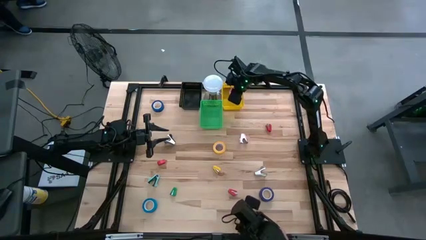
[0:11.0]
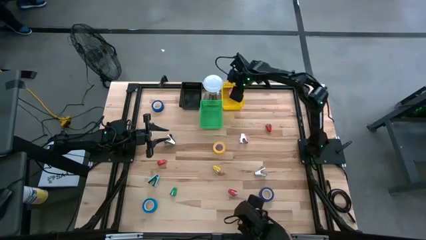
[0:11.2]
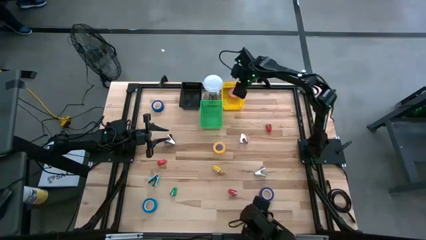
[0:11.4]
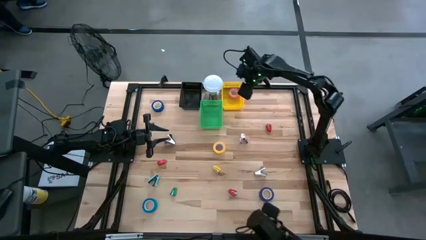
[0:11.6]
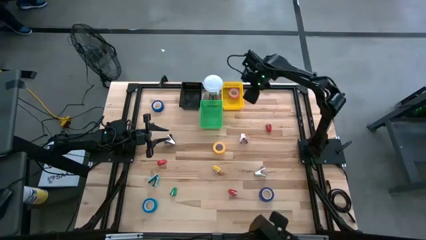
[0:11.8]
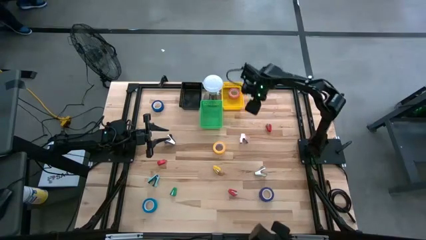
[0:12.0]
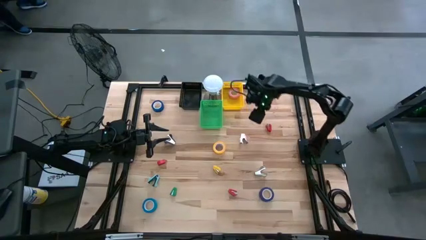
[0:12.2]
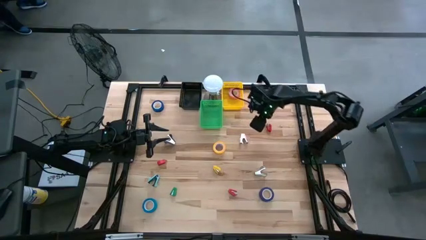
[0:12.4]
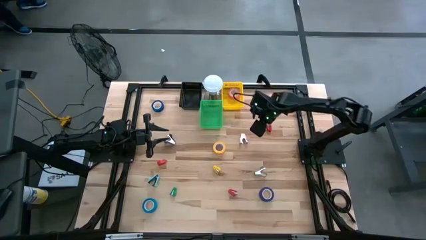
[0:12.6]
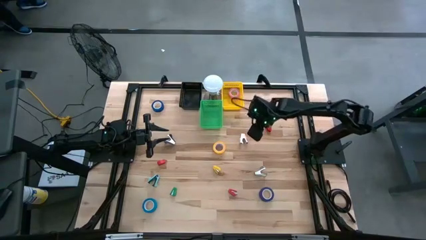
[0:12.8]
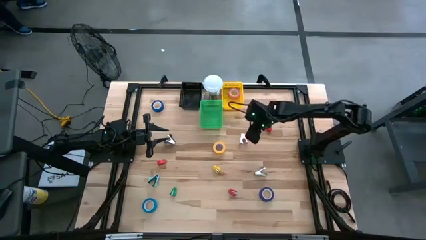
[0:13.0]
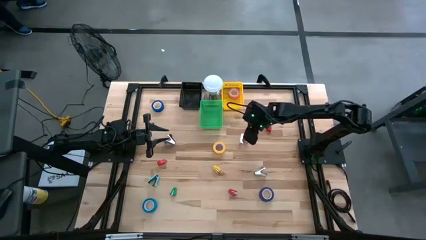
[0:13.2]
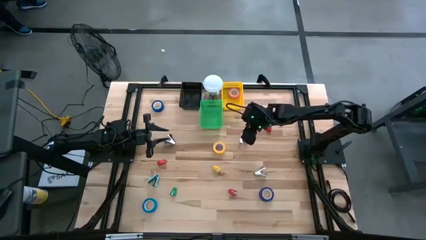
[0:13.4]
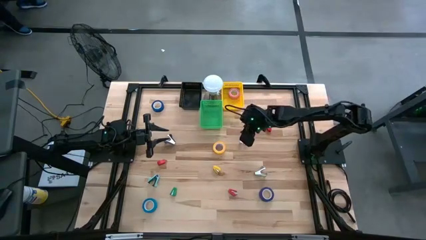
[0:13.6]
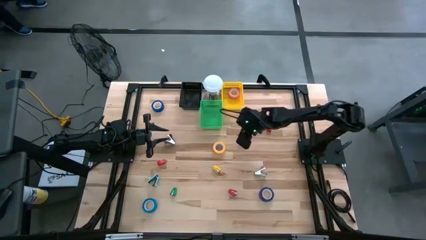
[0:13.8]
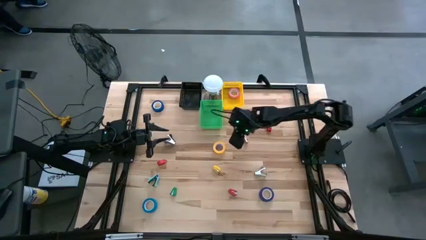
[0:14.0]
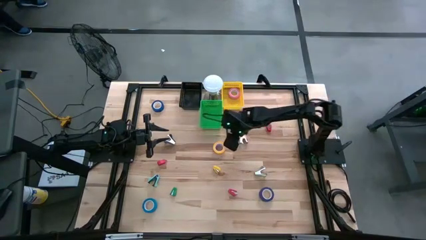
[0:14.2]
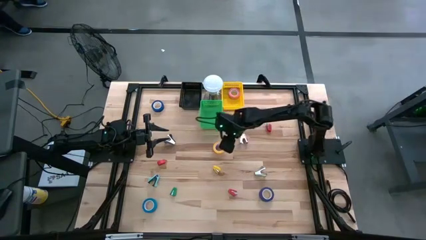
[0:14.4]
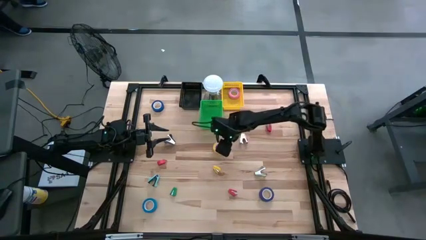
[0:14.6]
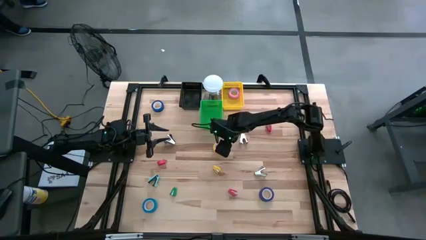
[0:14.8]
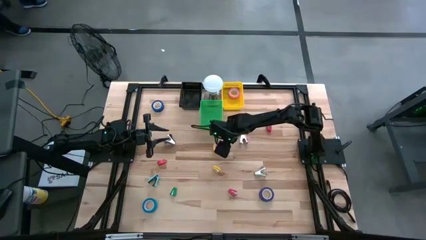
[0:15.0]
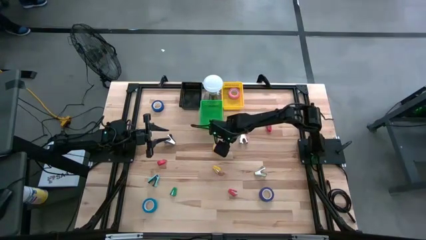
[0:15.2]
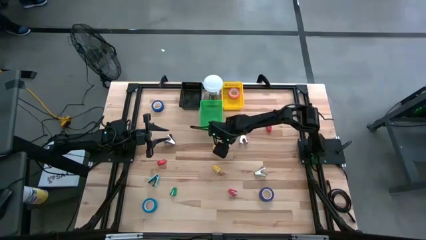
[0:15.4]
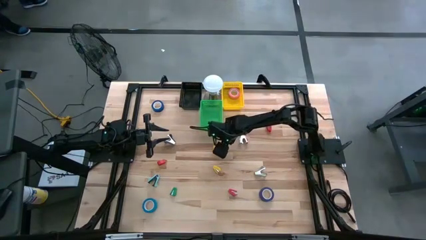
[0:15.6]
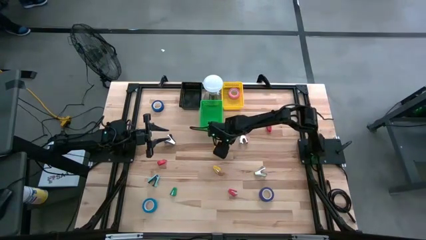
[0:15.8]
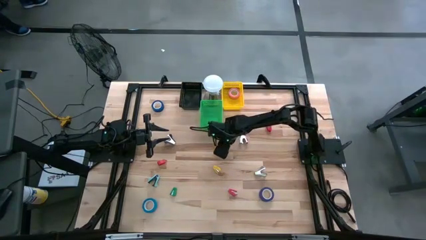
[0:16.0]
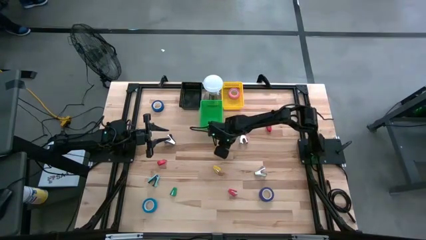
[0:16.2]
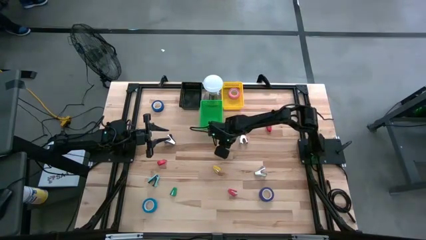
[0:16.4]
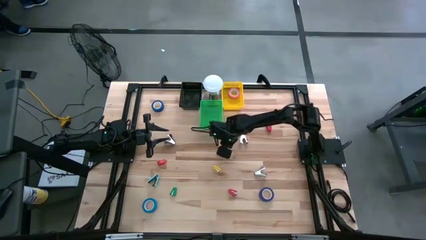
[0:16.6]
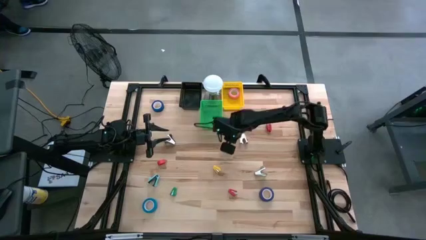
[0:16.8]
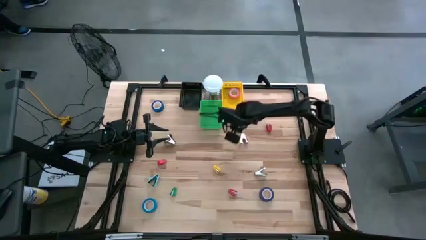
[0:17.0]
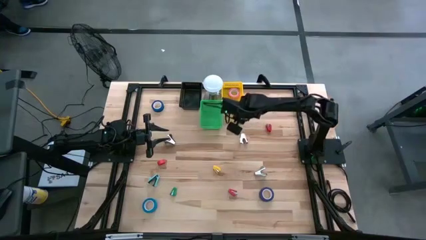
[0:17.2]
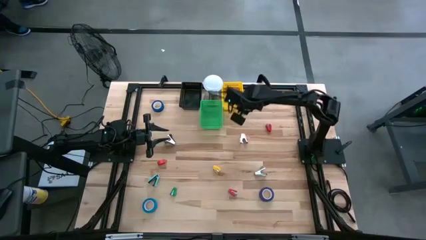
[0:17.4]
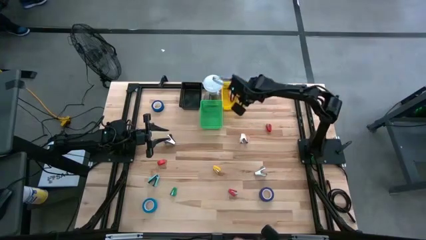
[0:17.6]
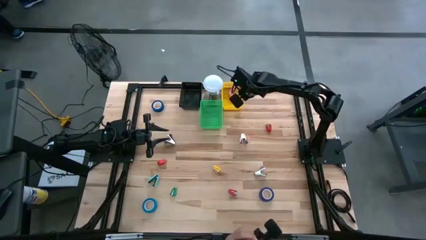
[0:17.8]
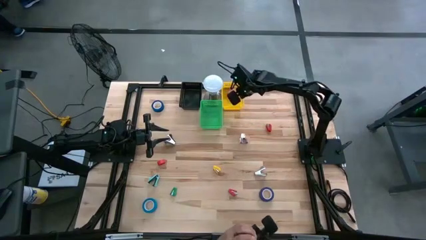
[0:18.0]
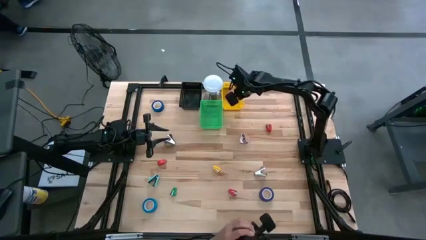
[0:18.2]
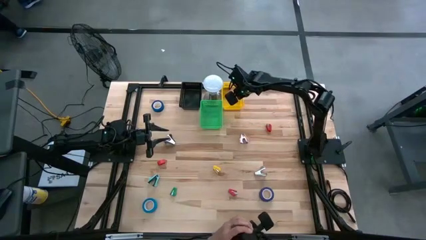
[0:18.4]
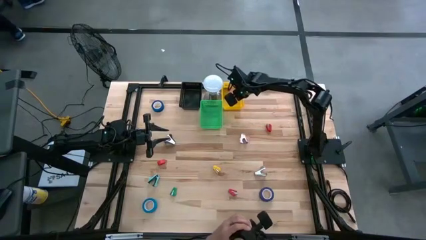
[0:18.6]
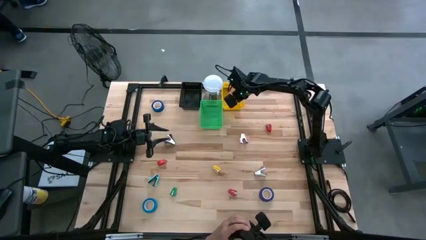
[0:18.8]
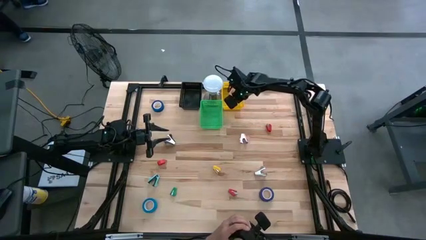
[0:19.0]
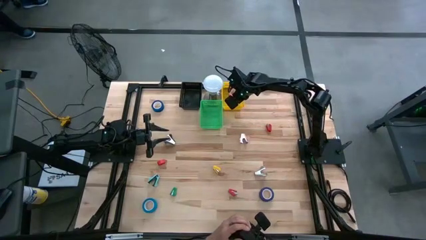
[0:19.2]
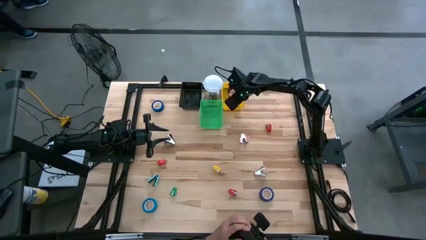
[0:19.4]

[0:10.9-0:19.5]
Task: Pick and place Stapler, Stapler remover, tape
Put the yellow tape into the yellow bin

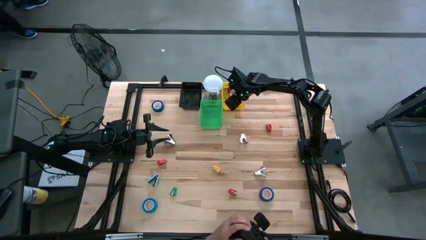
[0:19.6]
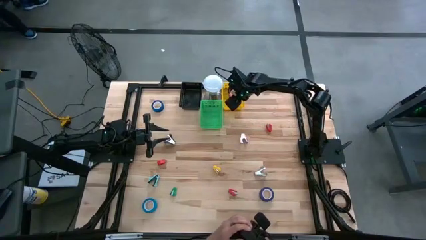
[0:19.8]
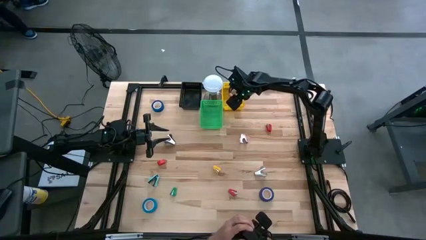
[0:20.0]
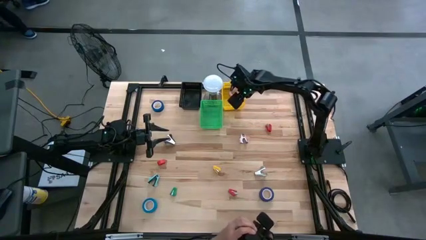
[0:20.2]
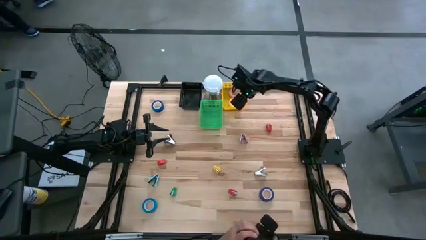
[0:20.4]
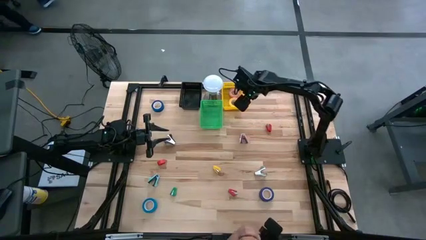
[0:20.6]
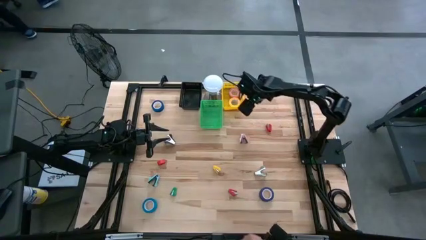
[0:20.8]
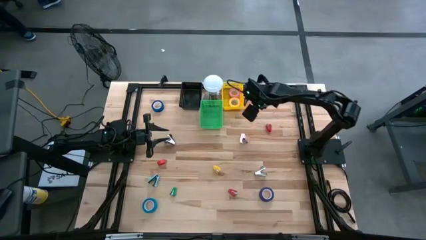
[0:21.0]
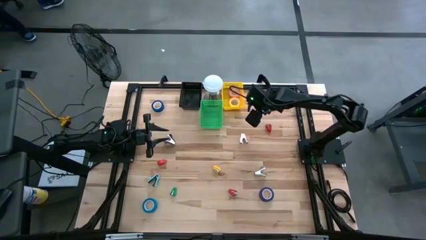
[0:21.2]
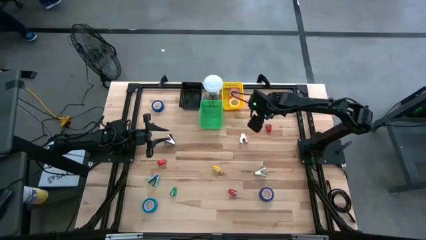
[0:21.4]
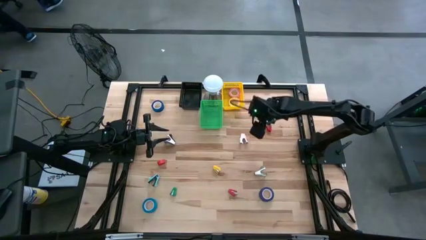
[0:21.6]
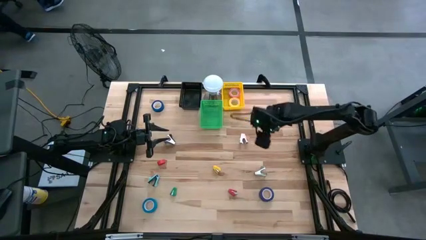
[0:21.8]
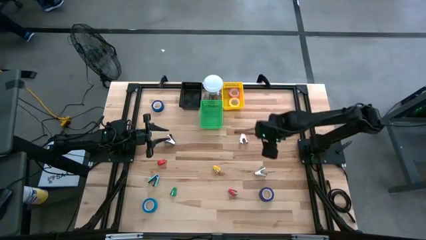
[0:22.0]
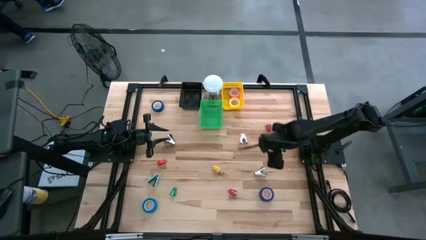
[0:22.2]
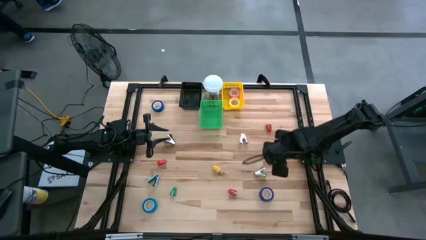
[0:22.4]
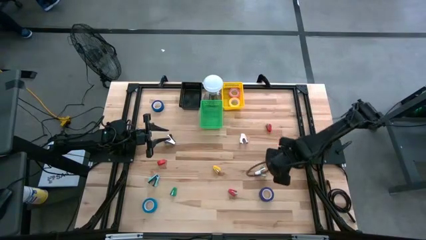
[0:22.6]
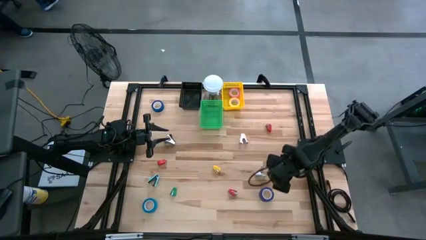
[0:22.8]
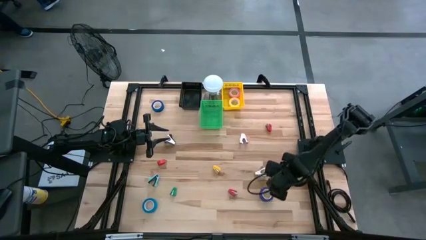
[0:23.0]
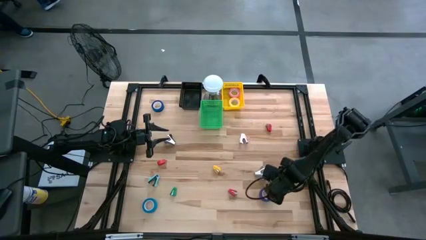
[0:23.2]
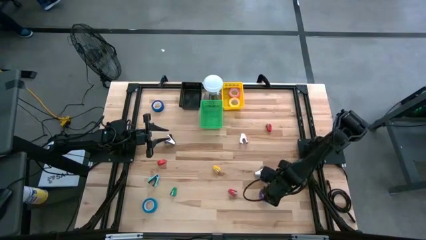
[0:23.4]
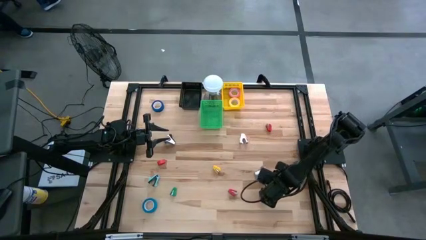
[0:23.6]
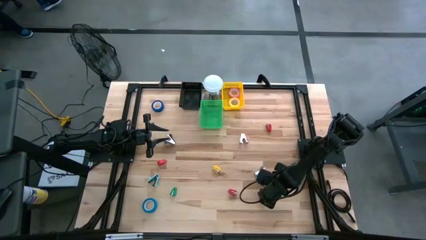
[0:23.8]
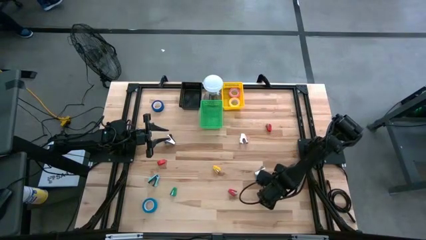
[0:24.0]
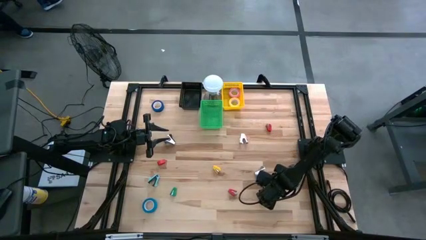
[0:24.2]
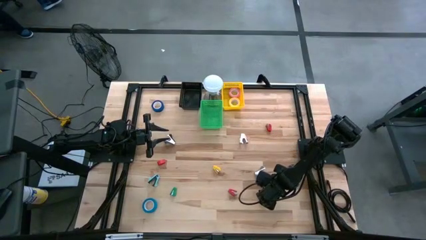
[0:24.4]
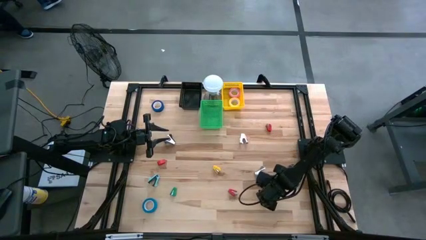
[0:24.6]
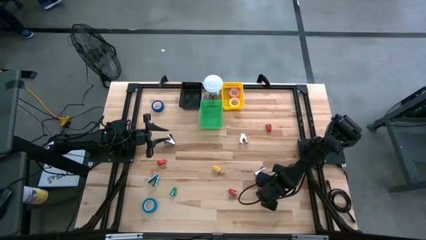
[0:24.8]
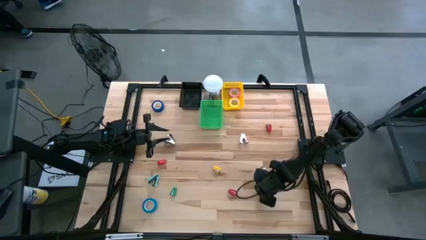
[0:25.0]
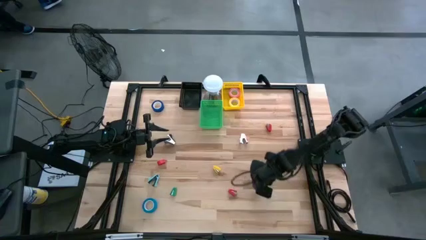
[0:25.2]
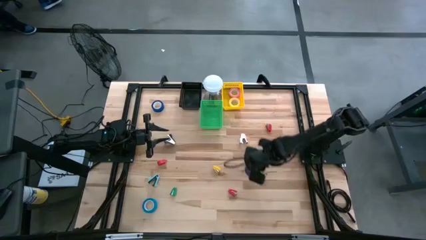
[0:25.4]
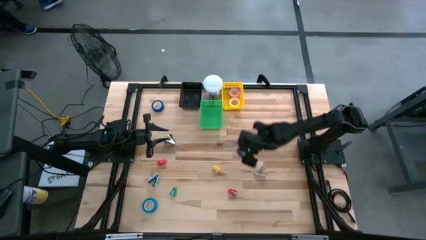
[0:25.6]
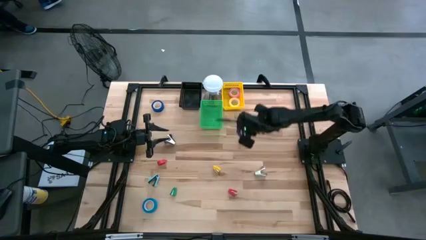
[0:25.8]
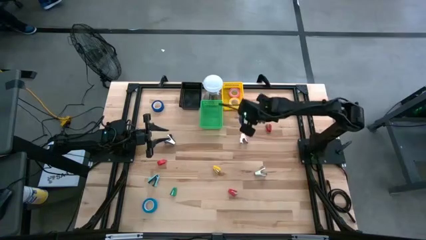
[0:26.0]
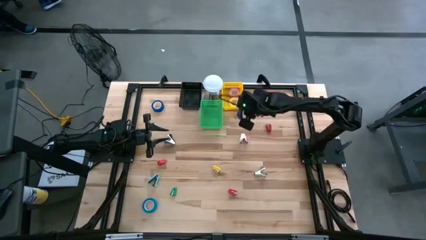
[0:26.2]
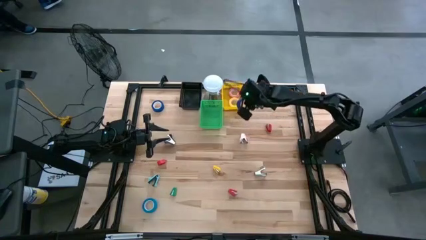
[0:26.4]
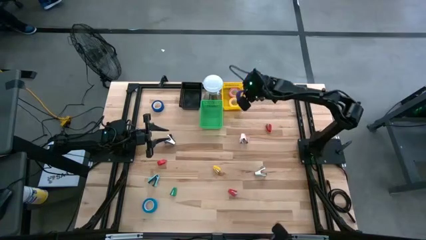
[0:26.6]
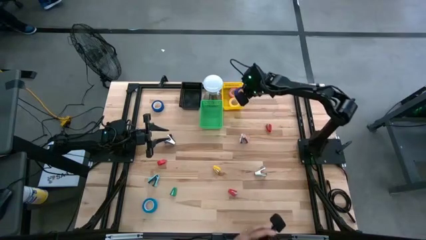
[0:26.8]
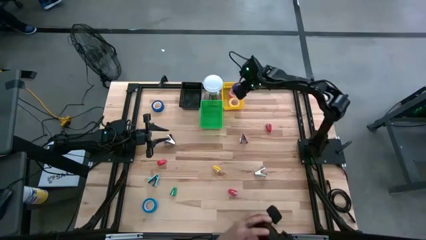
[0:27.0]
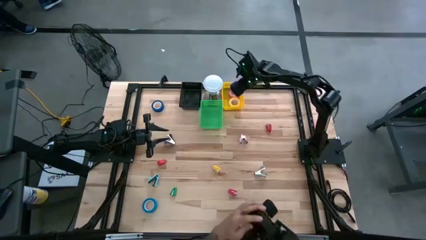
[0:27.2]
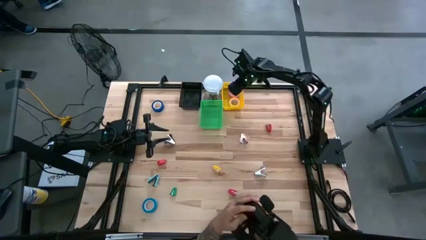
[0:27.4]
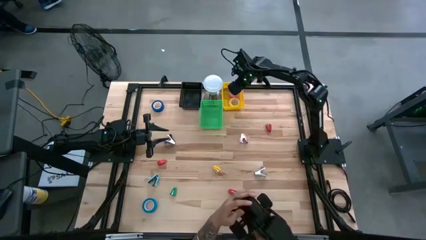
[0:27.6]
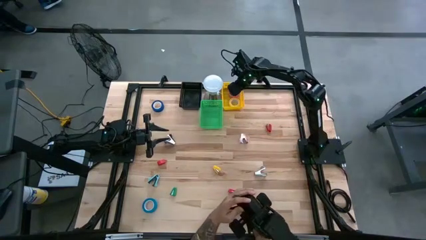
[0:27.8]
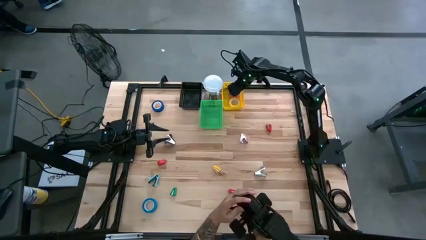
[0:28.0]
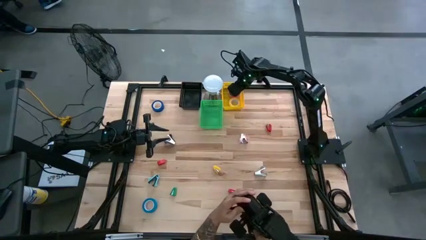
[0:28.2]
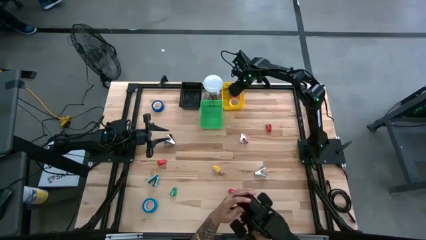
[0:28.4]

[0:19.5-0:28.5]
Put the violet tape into the yellow bin
